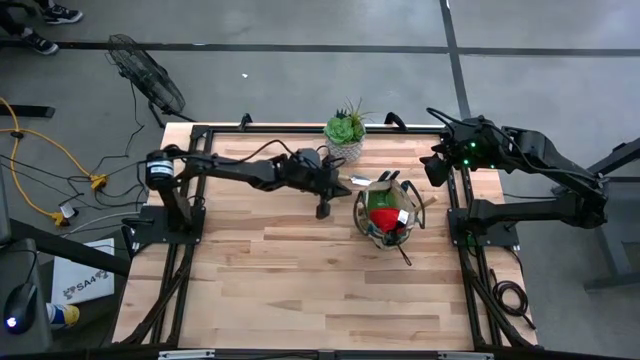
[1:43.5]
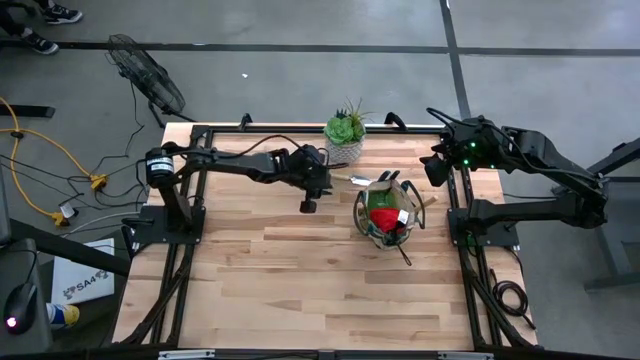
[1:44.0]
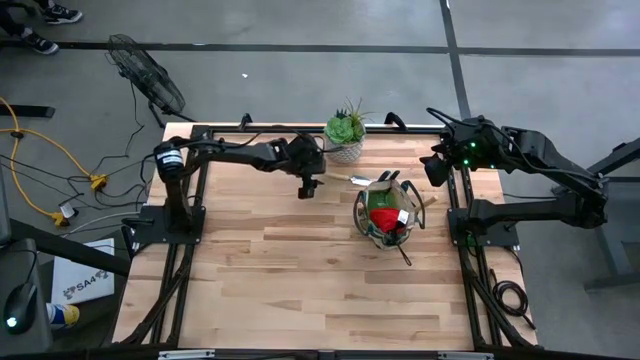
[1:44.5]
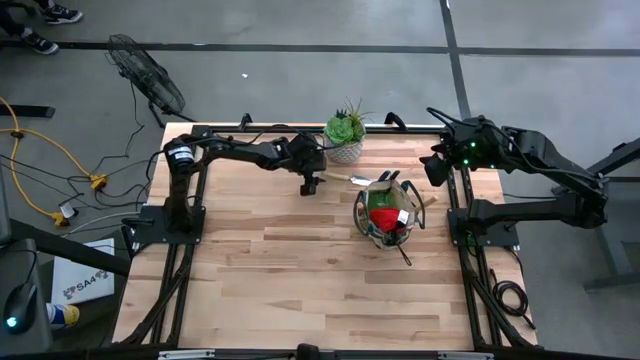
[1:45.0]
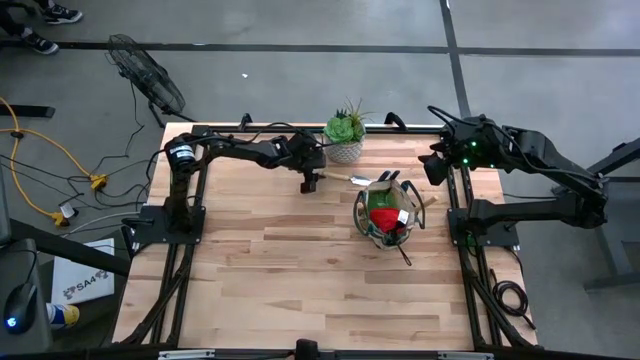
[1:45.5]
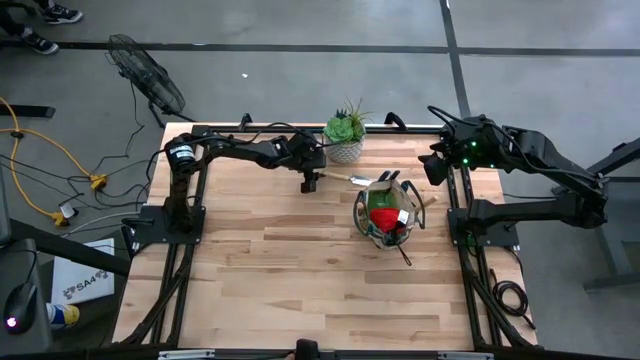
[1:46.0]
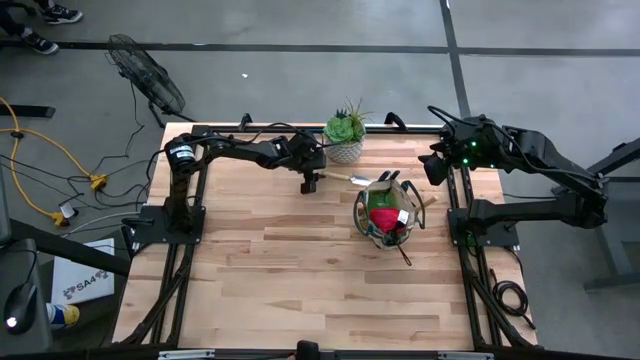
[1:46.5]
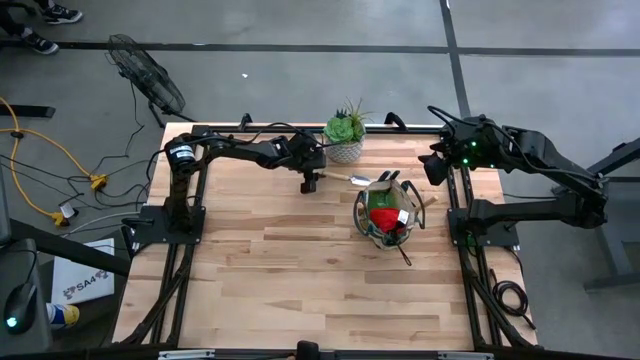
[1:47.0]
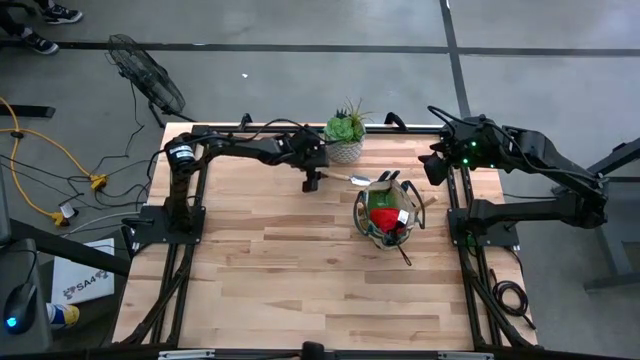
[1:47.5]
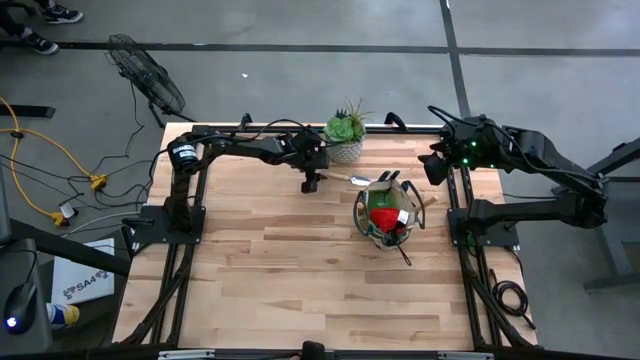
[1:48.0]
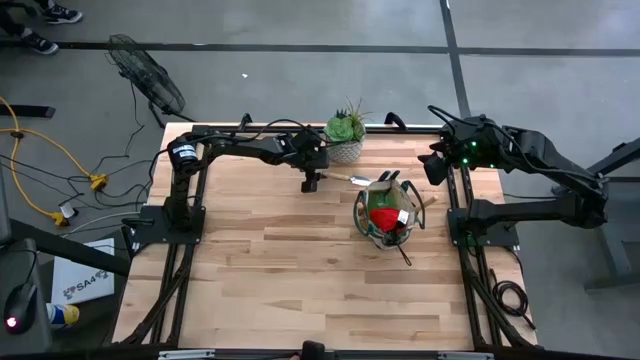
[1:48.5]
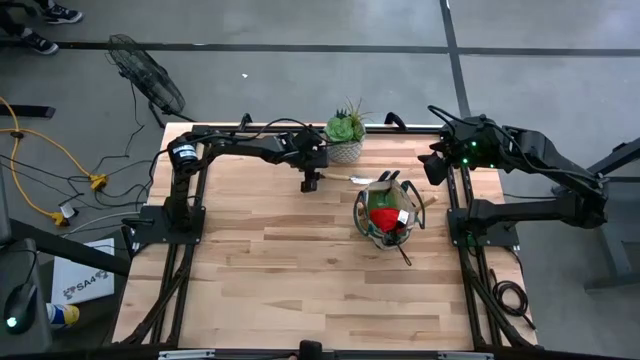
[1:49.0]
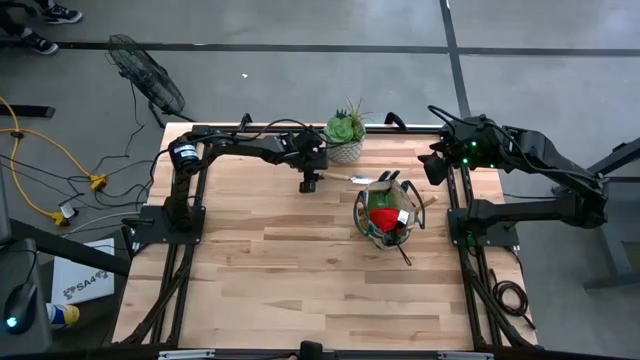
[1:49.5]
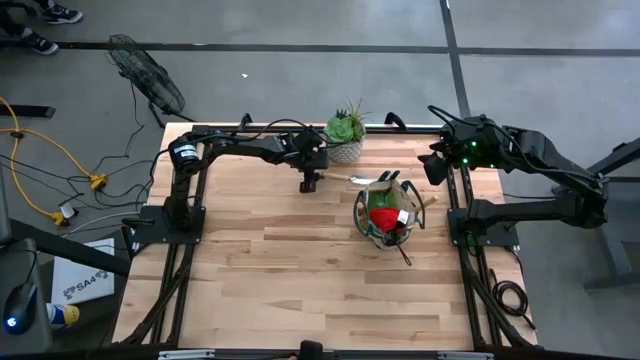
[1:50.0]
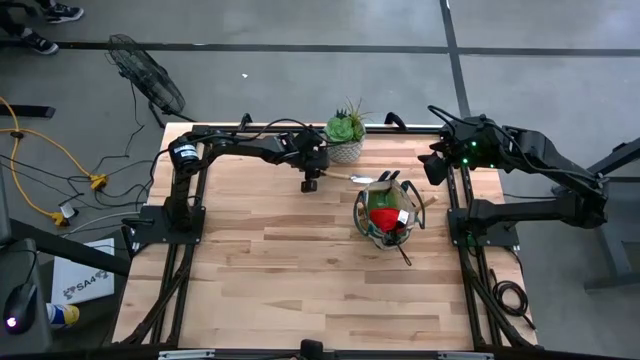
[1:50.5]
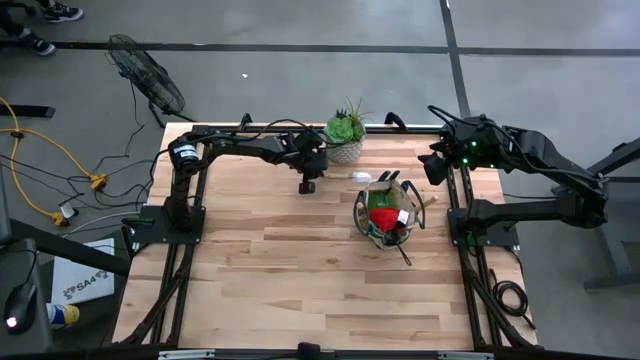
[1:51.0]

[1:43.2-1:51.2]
Task: Pick & Place Garden tools in Gardening bag
Put the brown trowel into the brown gardening bag

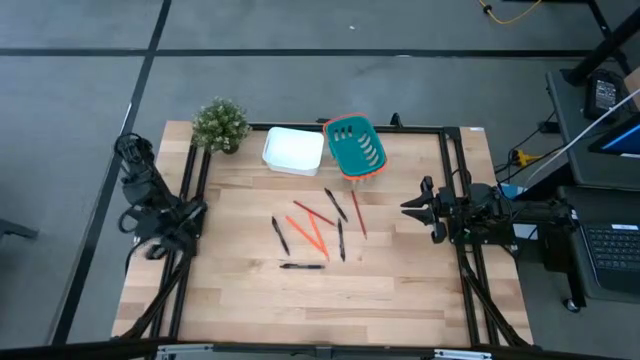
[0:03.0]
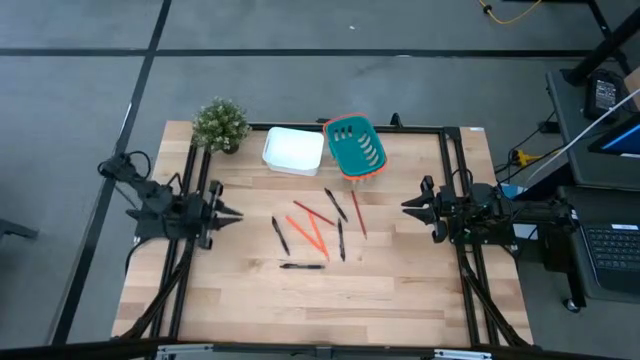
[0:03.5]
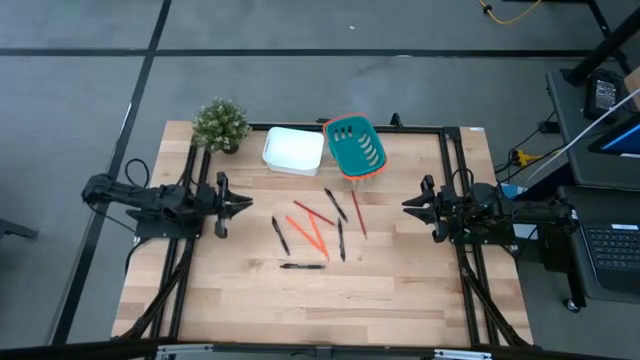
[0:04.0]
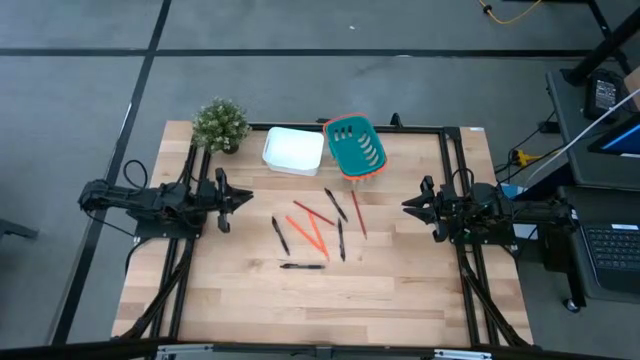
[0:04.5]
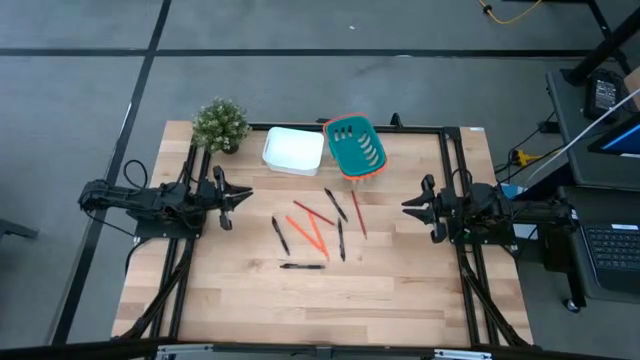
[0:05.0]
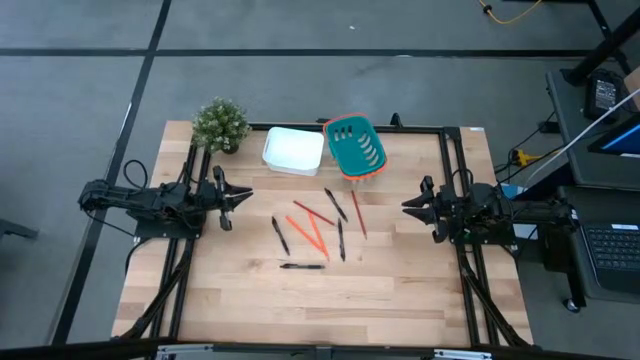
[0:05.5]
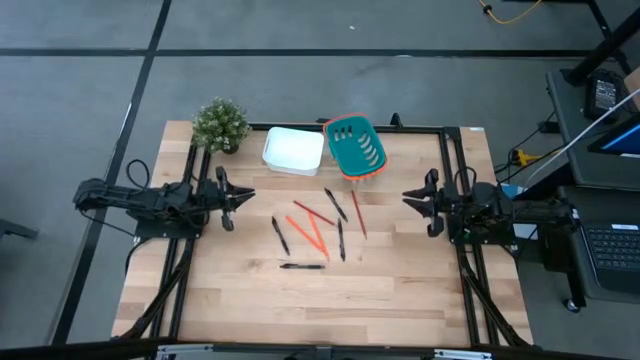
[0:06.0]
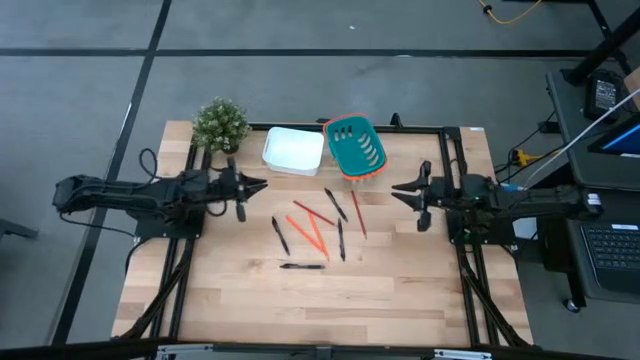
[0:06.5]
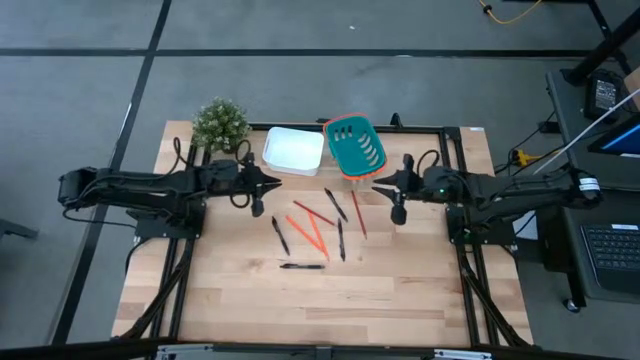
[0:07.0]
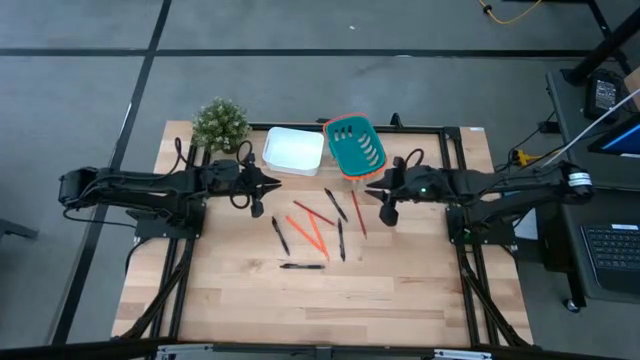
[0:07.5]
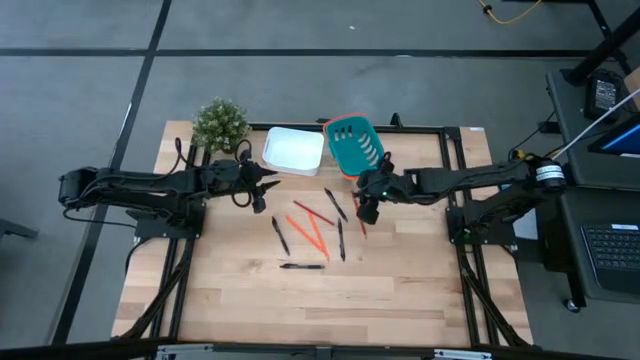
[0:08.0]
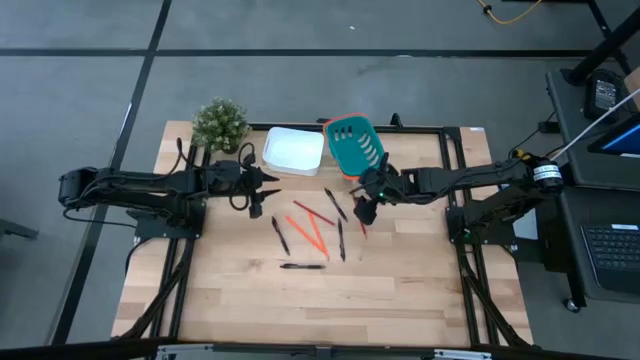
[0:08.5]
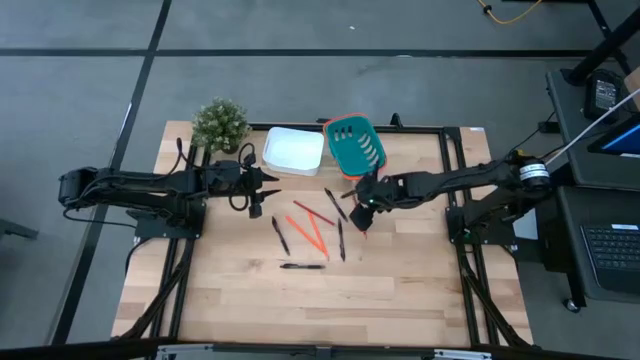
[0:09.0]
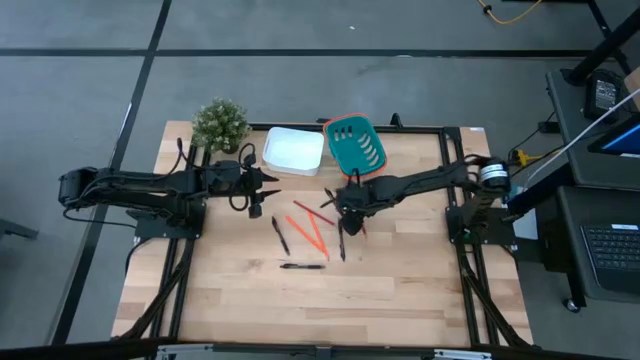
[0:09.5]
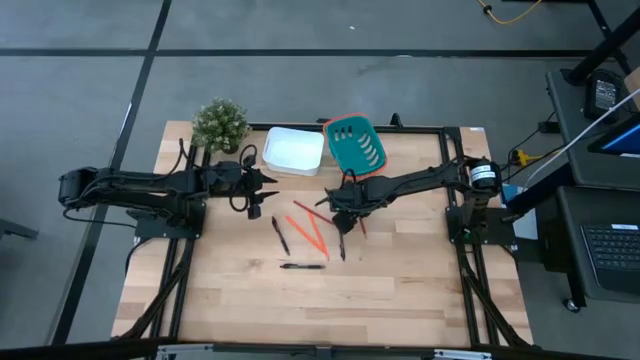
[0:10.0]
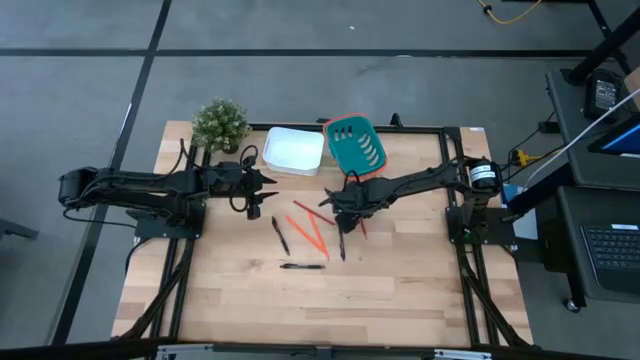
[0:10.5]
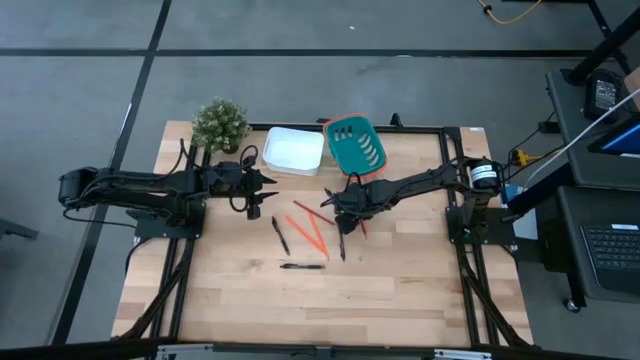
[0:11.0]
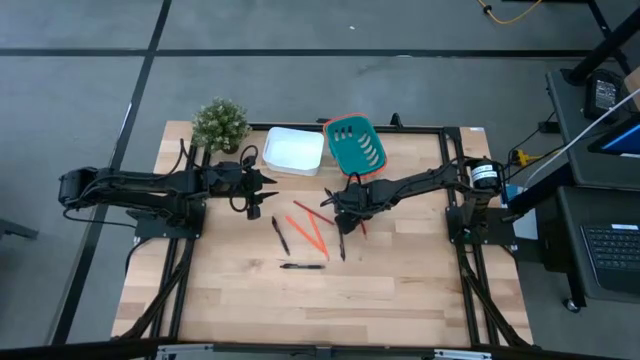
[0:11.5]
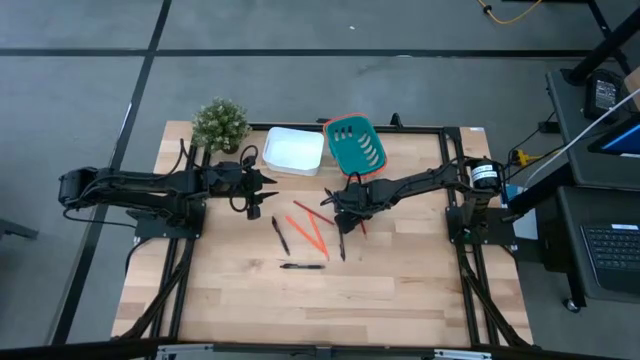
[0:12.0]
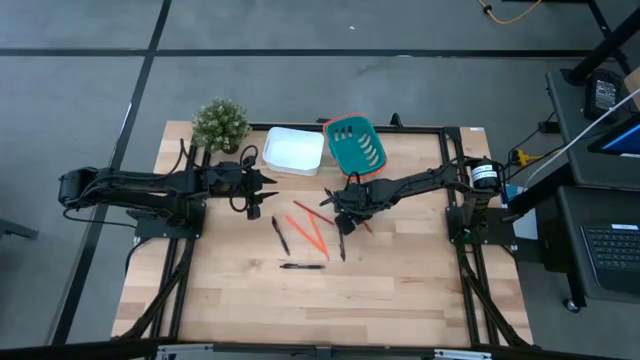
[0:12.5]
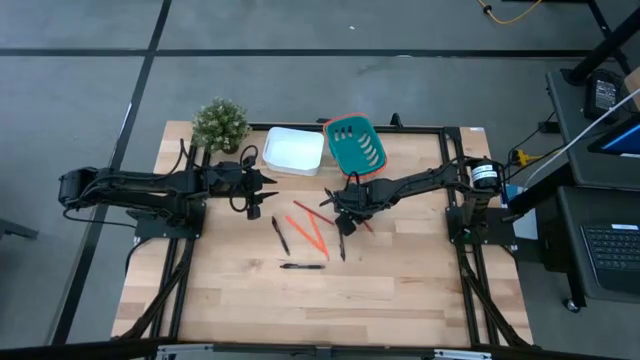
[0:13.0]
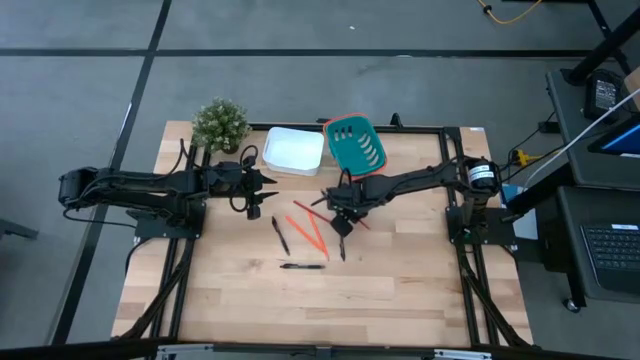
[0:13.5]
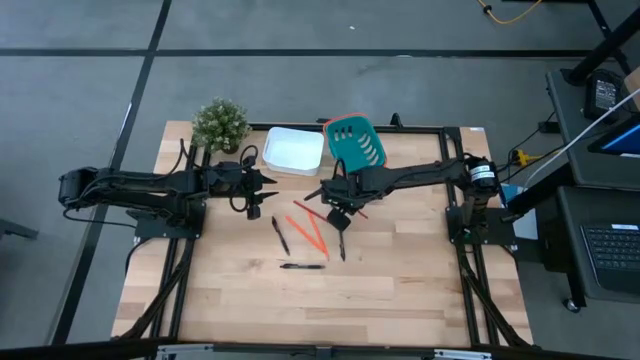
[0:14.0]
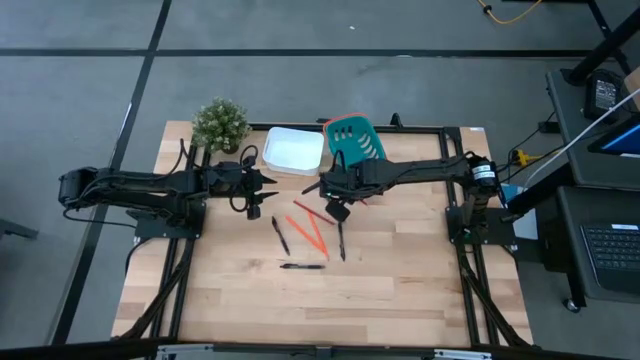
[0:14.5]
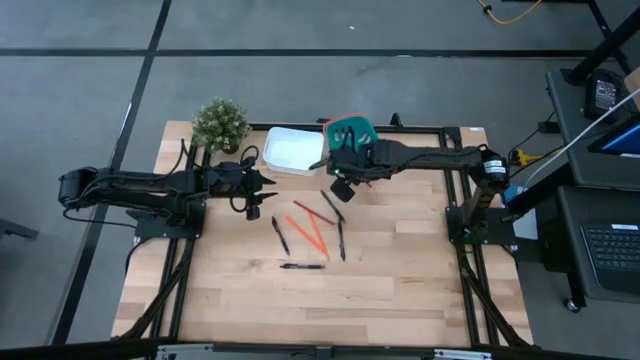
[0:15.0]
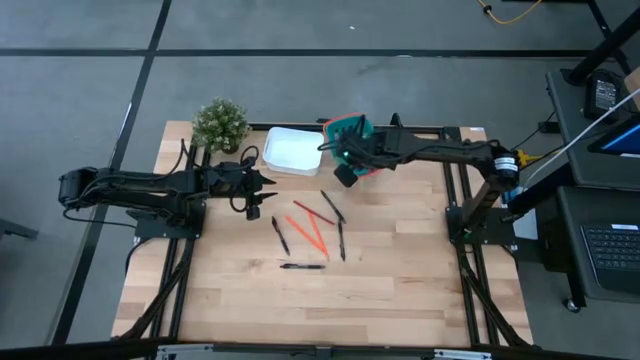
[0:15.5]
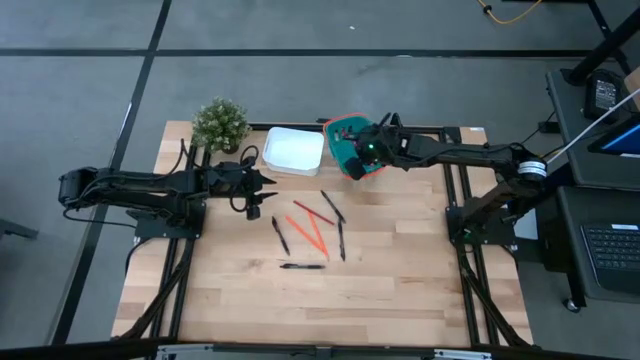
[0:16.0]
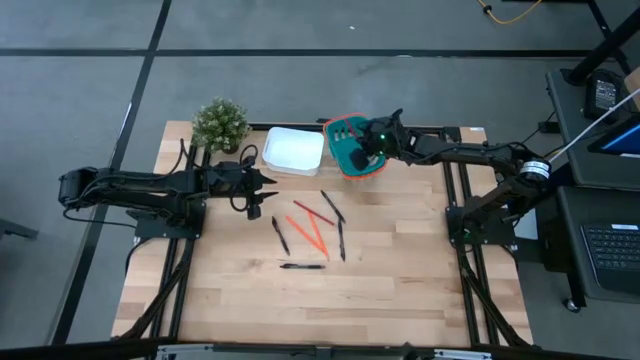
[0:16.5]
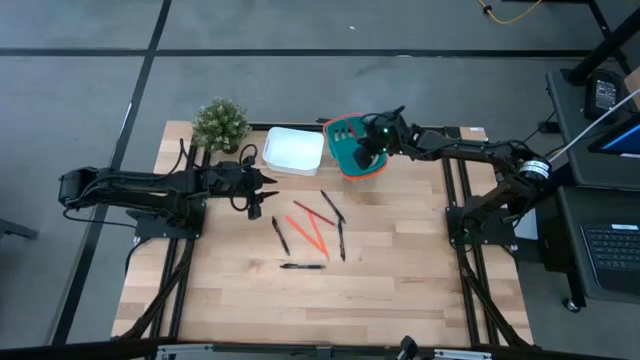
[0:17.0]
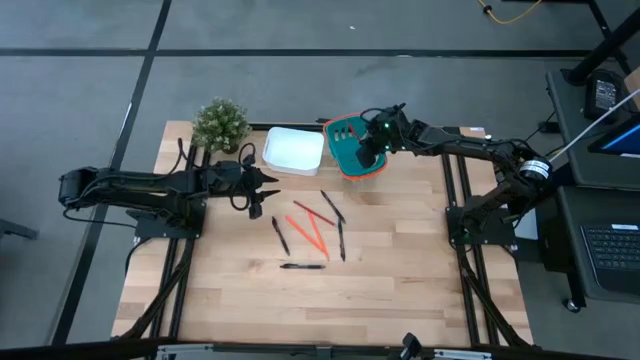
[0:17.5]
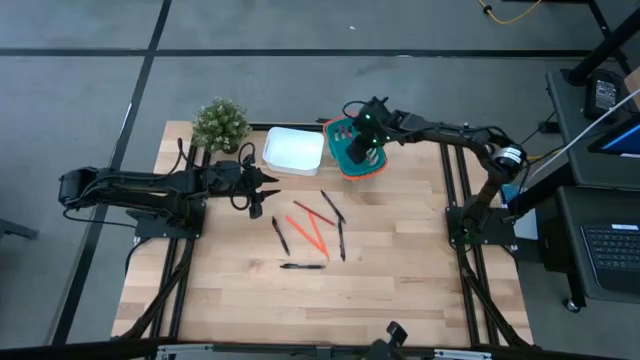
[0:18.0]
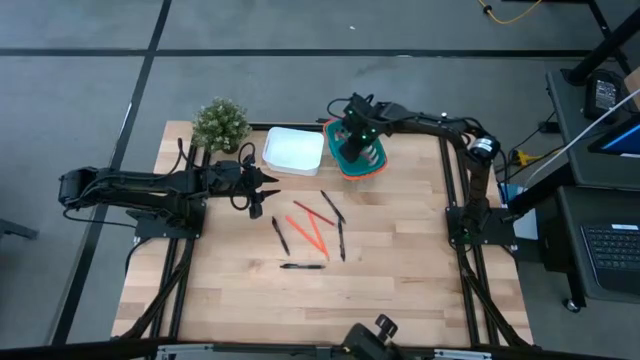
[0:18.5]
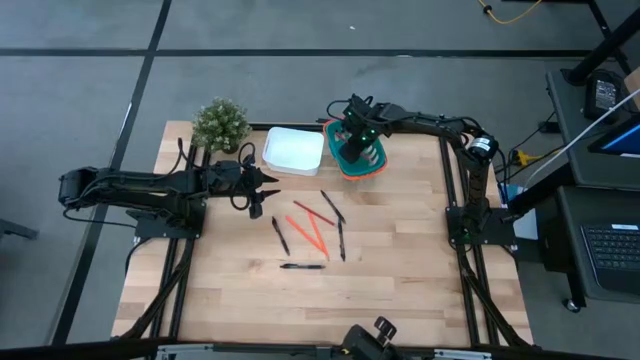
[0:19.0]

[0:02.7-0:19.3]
Task: Sort pens & pencils
Put the right red pencil into the dark green bin
